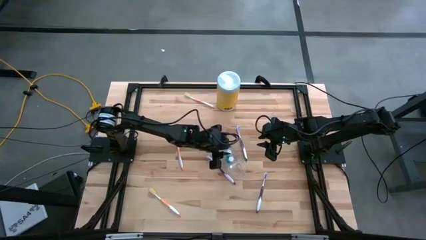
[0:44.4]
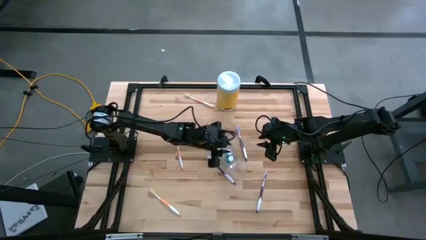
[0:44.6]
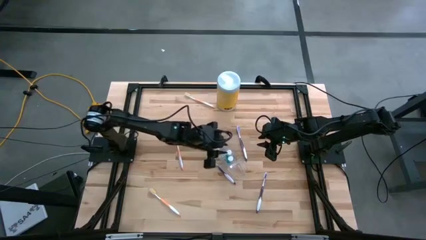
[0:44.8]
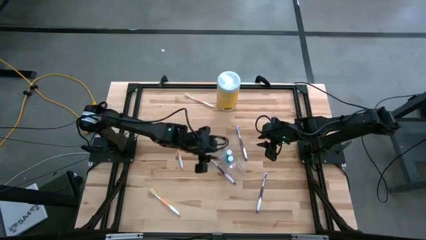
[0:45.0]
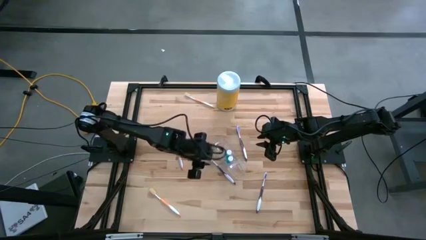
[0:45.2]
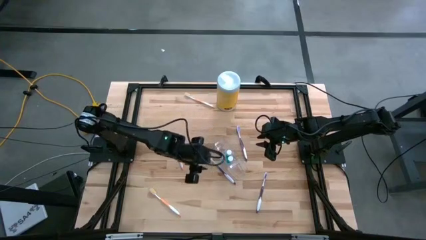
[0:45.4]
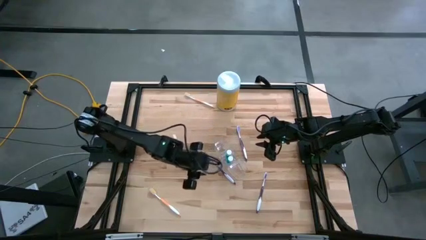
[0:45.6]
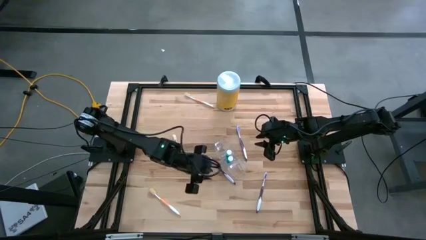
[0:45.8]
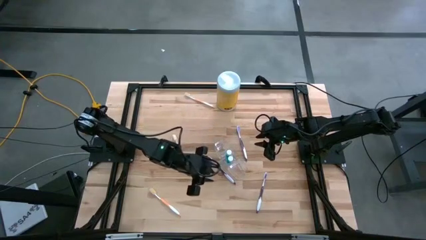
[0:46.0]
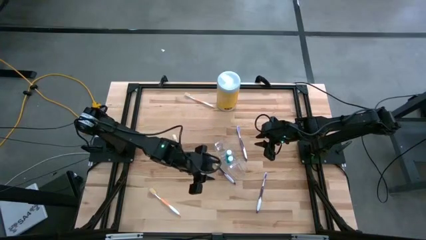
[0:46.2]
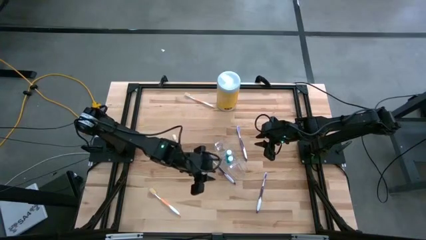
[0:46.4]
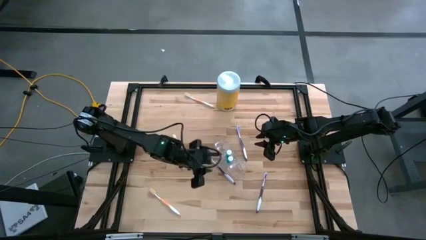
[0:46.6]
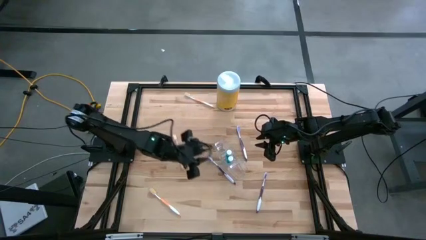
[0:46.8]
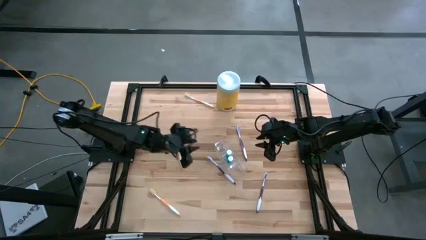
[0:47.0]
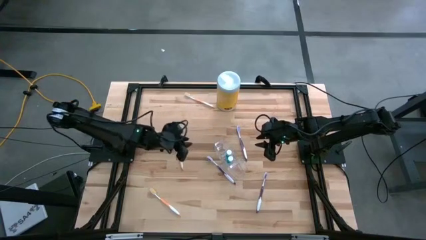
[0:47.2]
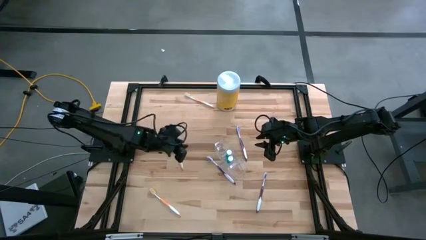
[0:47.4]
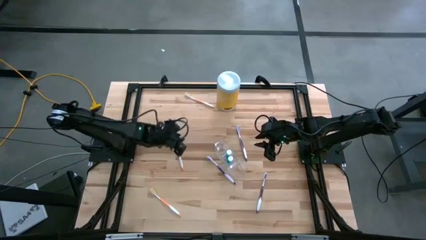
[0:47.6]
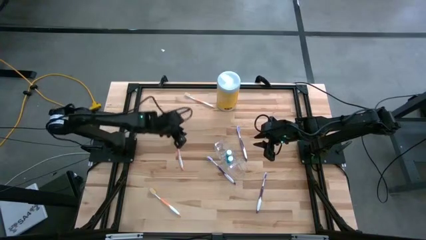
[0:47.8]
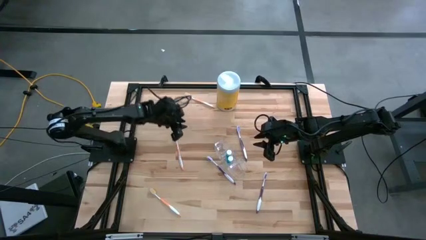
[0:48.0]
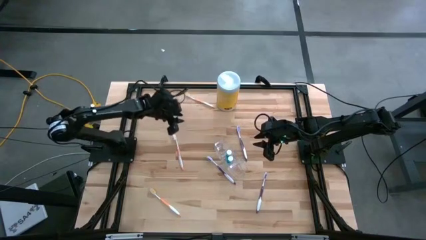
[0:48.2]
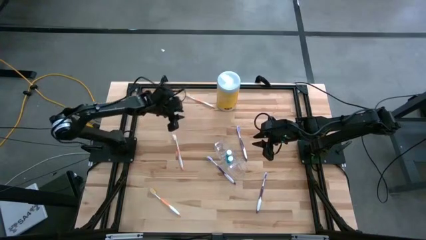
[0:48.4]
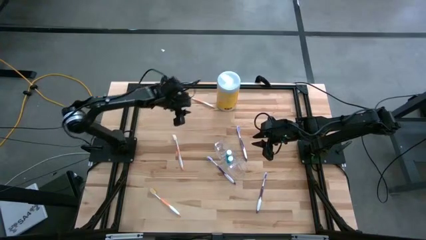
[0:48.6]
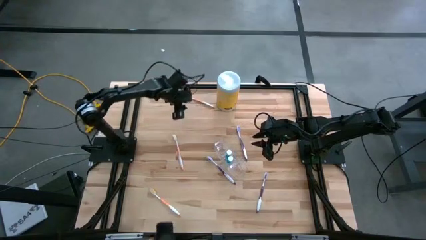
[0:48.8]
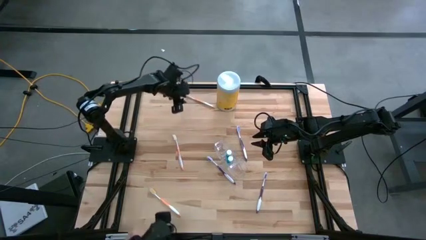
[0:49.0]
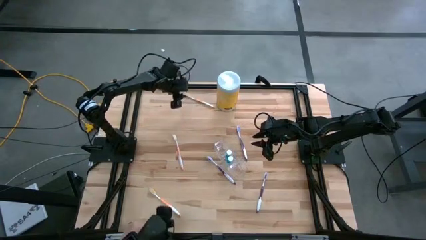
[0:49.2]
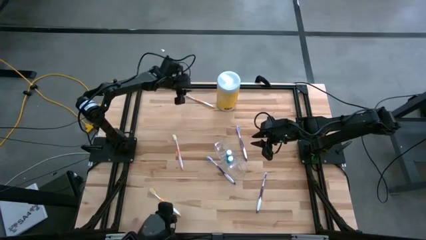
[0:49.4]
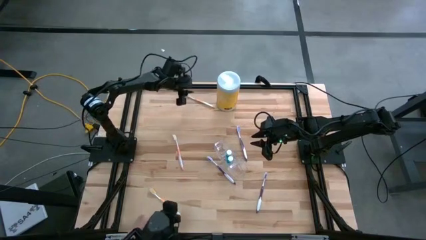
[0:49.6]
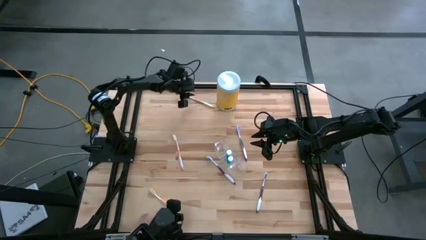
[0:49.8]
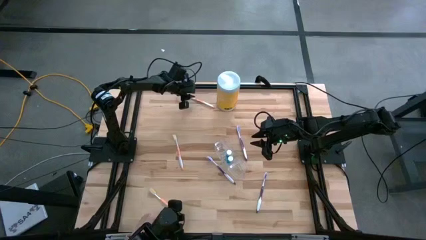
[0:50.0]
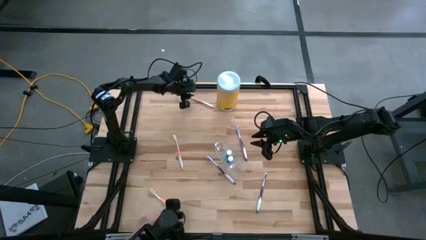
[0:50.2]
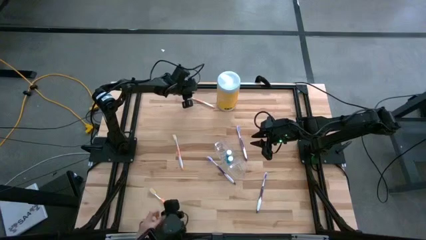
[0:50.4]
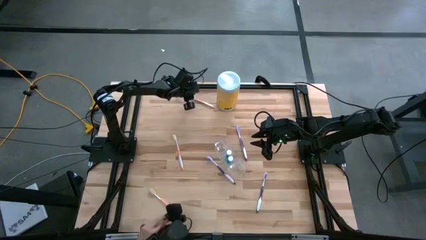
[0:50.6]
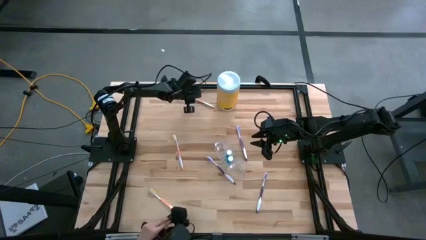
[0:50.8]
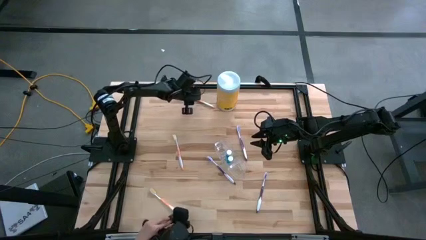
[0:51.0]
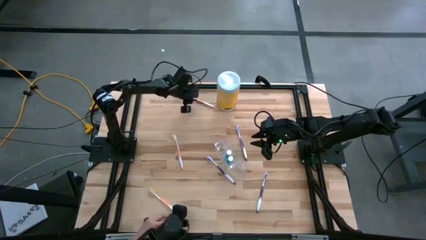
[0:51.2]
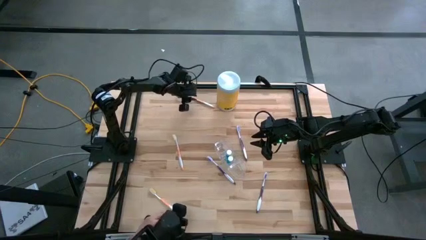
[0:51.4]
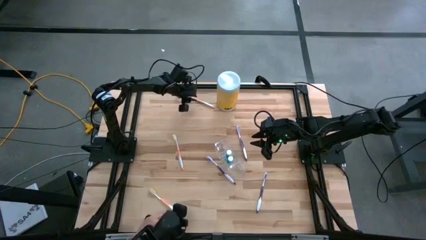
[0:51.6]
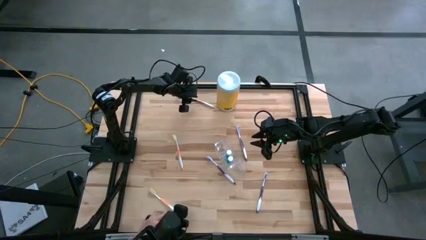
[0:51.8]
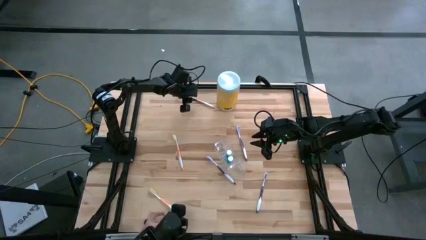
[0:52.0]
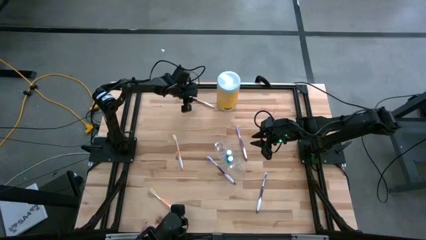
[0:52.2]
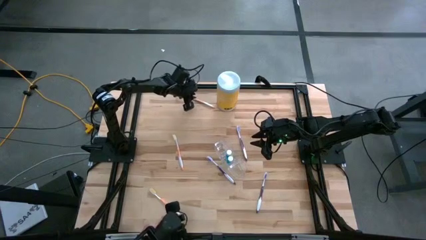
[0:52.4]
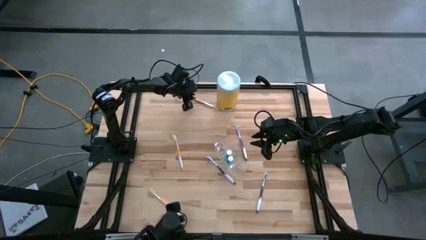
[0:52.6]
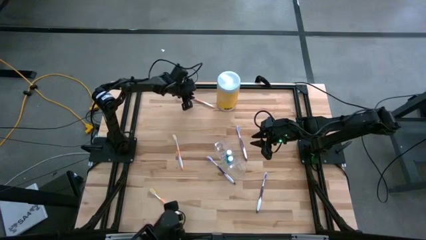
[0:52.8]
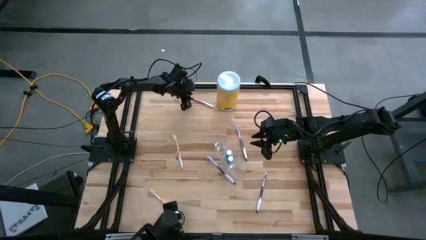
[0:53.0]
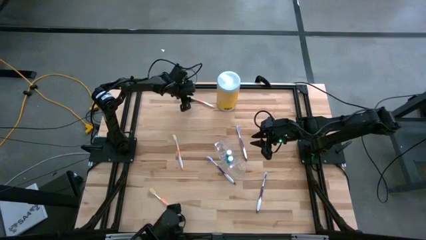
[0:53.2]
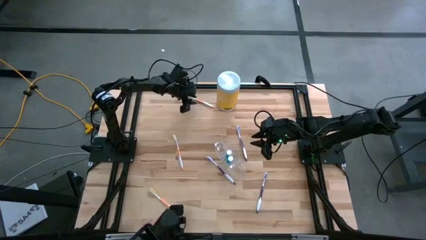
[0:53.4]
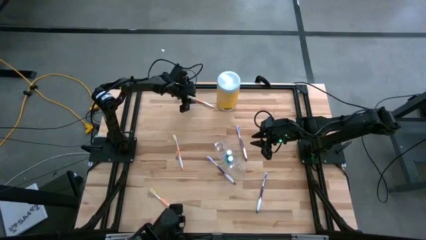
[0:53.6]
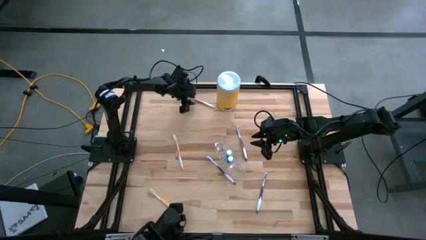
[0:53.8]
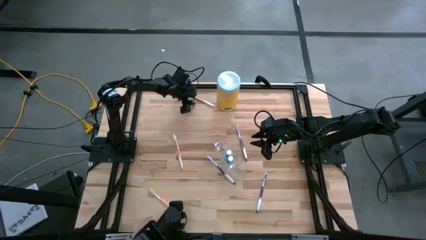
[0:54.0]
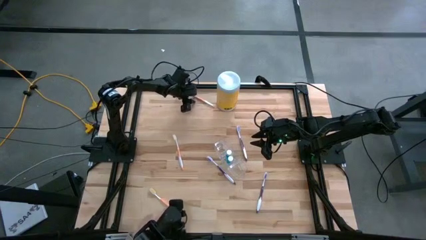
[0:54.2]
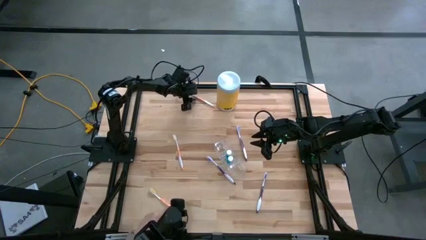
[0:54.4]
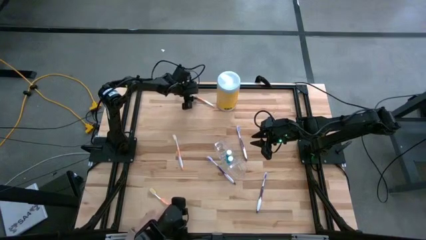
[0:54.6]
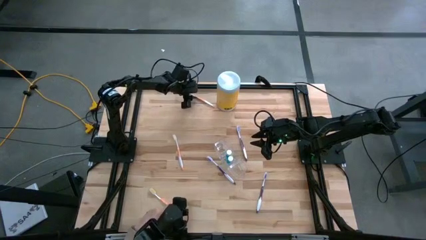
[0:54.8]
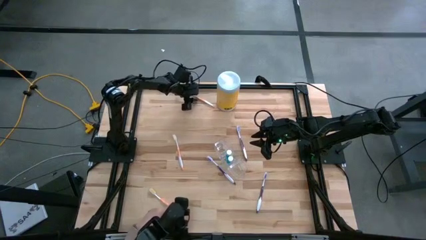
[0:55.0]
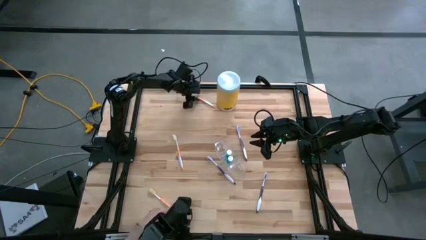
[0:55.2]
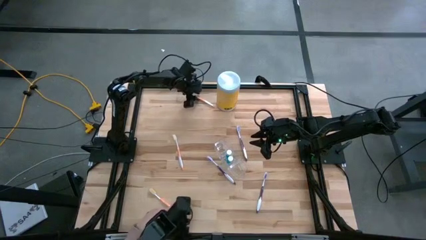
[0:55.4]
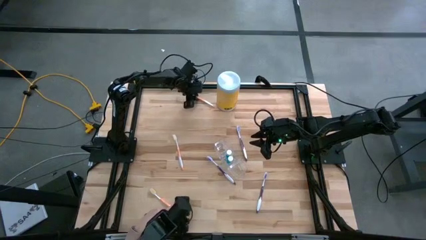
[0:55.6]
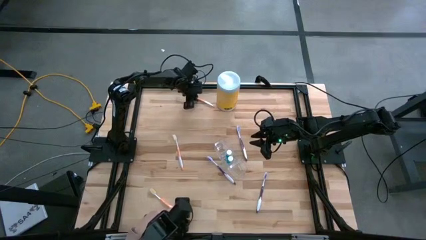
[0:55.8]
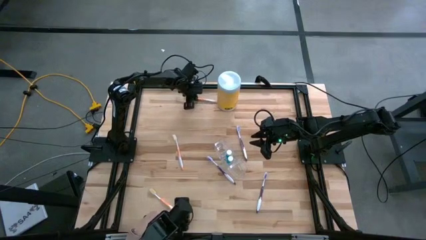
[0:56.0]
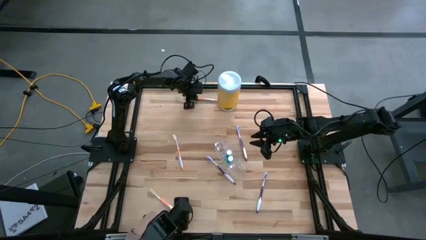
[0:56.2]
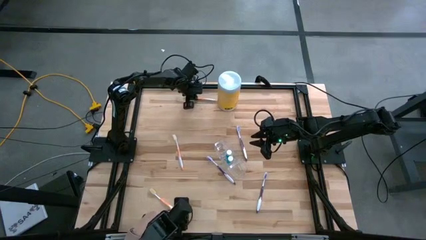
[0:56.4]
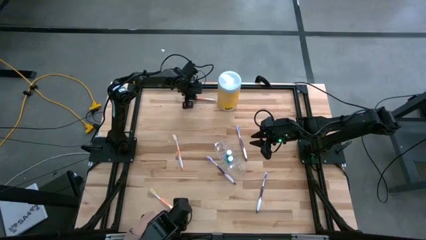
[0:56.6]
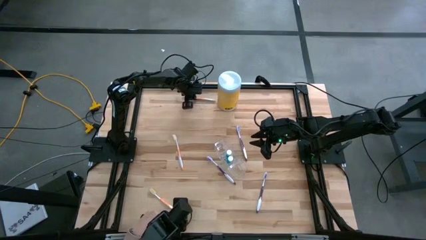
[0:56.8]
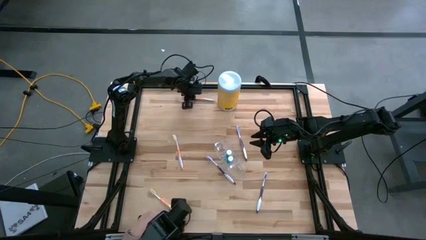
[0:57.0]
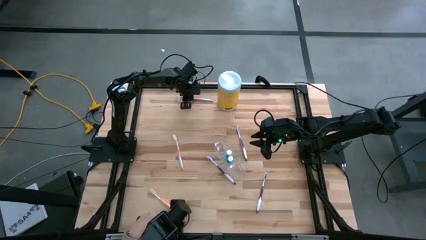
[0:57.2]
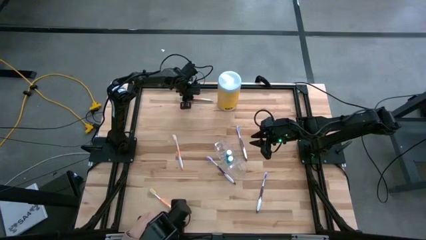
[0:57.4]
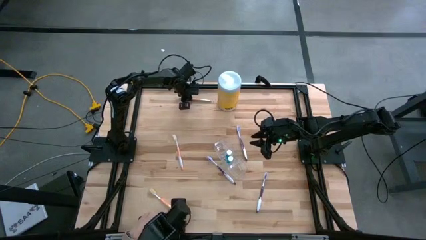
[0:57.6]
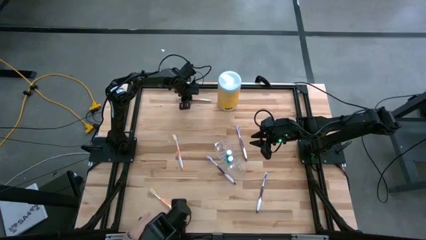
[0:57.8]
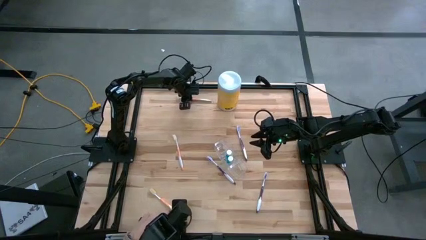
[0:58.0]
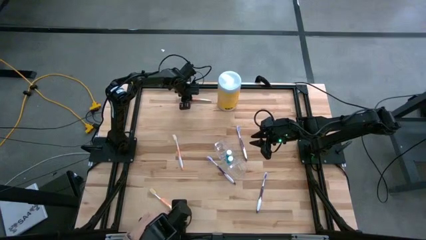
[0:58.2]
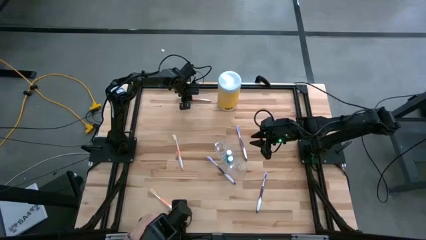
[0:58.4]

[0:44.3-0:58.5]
Task: Pick & Place toothbrushing station
Put the top orange toothbrush into the top compartment of the transparent organizer
